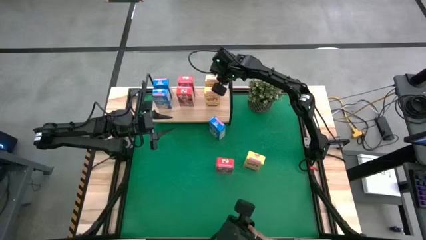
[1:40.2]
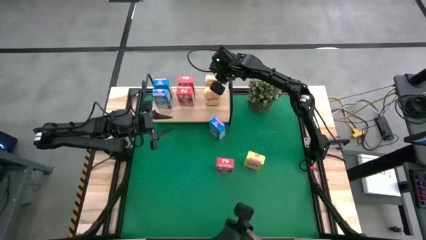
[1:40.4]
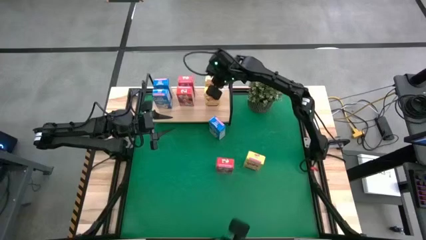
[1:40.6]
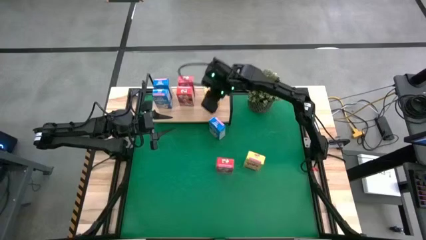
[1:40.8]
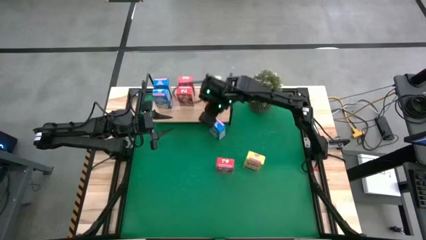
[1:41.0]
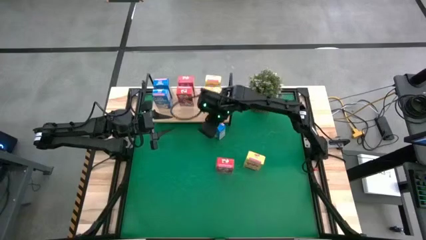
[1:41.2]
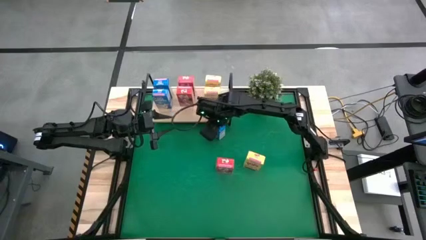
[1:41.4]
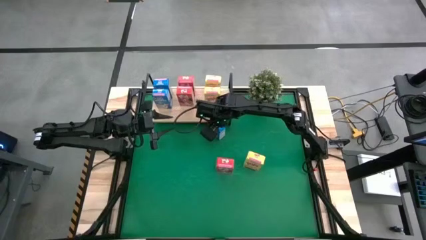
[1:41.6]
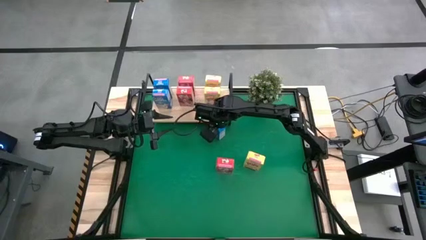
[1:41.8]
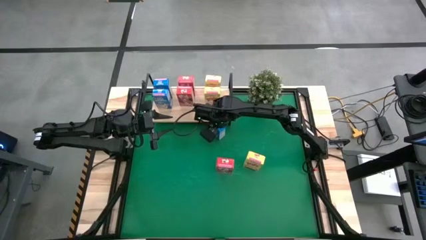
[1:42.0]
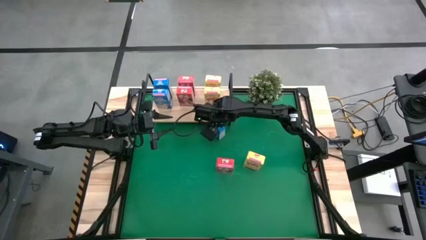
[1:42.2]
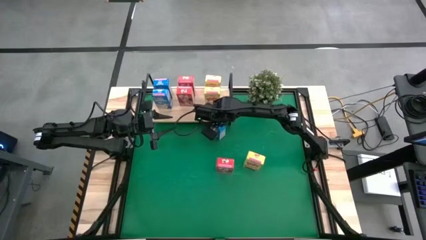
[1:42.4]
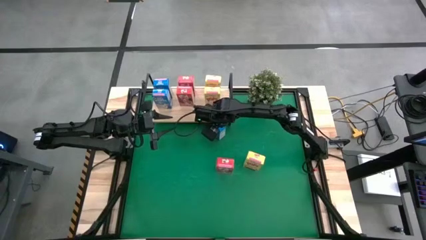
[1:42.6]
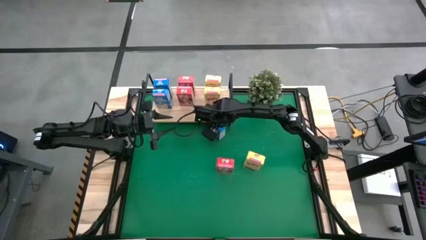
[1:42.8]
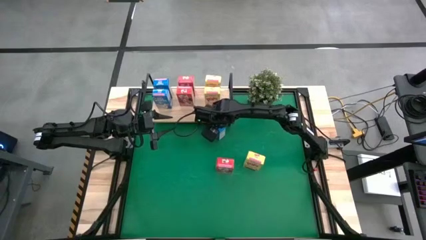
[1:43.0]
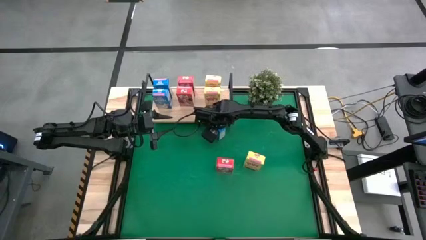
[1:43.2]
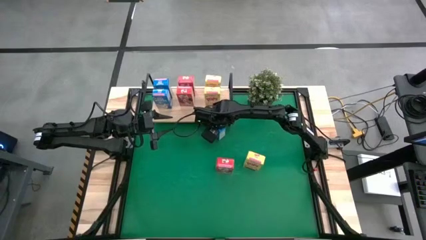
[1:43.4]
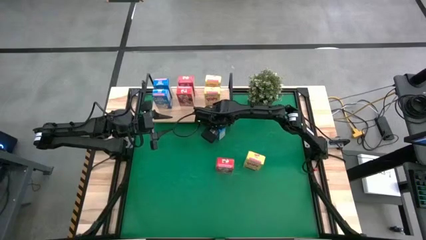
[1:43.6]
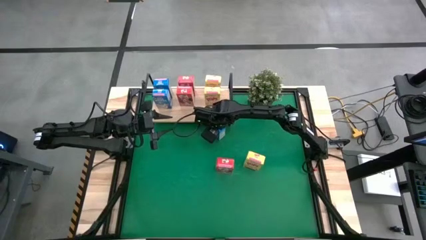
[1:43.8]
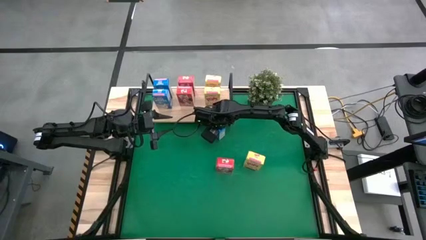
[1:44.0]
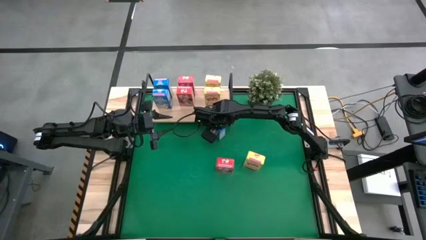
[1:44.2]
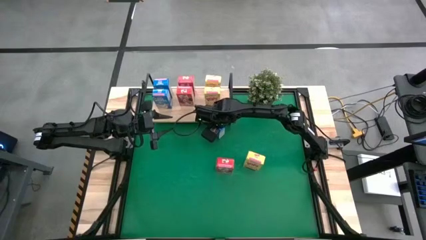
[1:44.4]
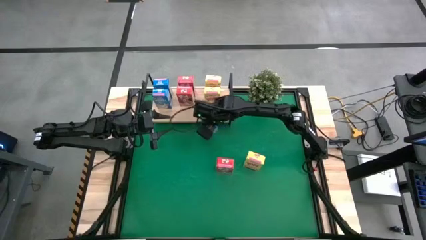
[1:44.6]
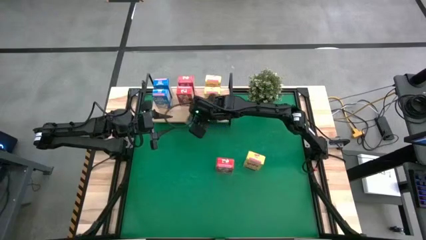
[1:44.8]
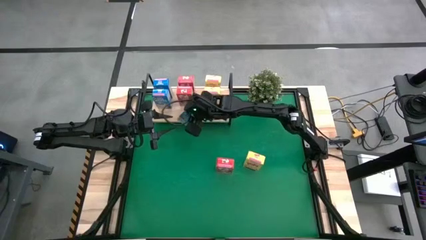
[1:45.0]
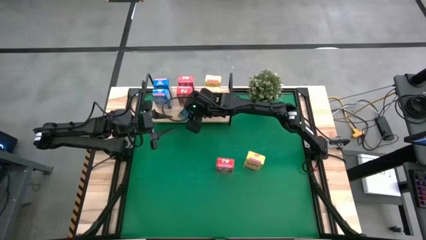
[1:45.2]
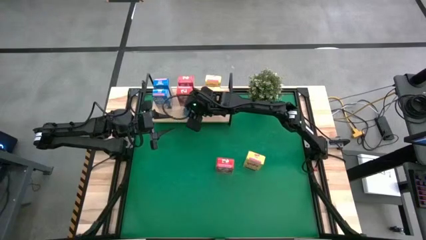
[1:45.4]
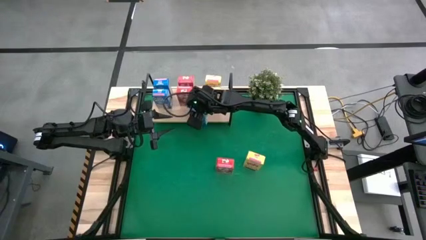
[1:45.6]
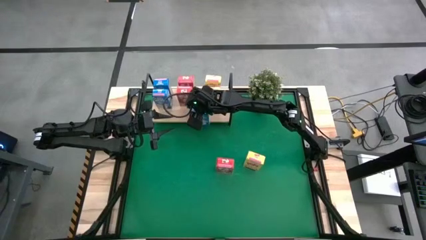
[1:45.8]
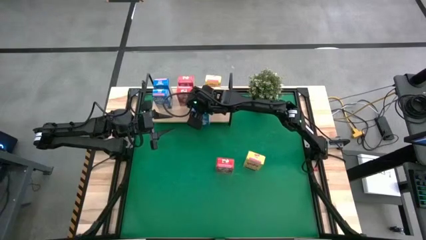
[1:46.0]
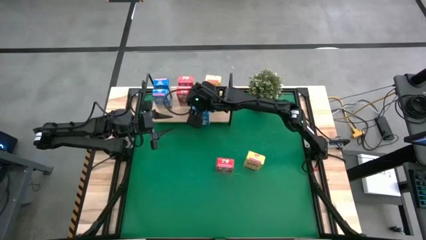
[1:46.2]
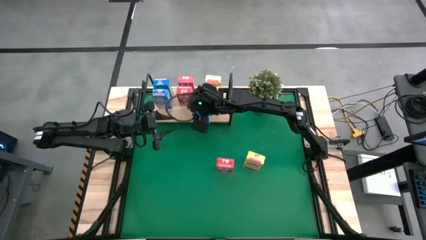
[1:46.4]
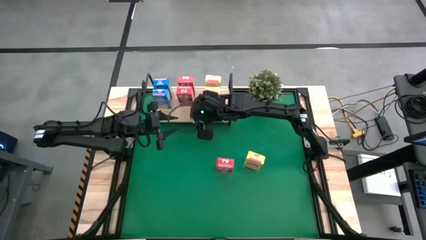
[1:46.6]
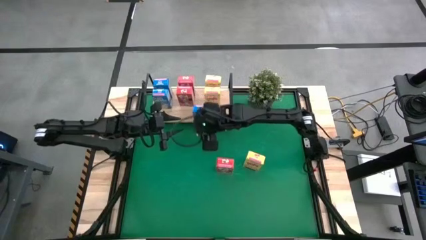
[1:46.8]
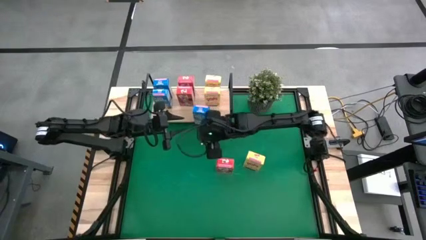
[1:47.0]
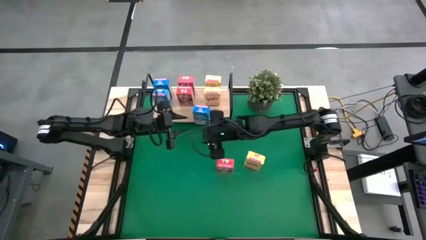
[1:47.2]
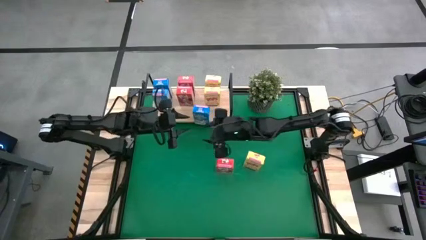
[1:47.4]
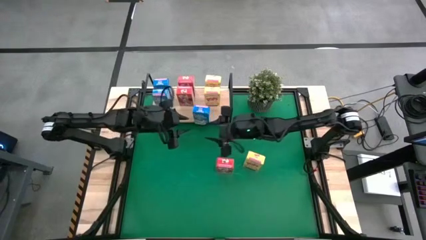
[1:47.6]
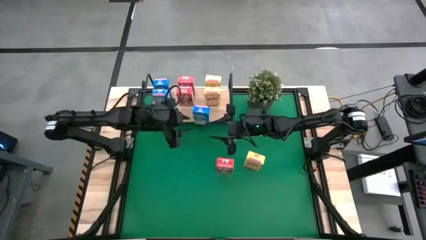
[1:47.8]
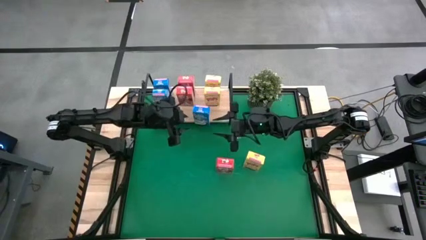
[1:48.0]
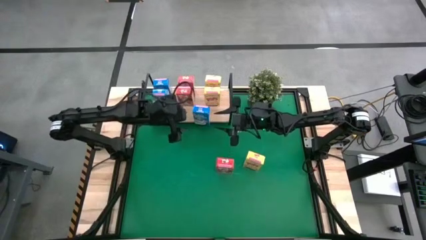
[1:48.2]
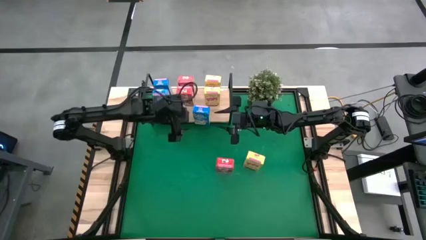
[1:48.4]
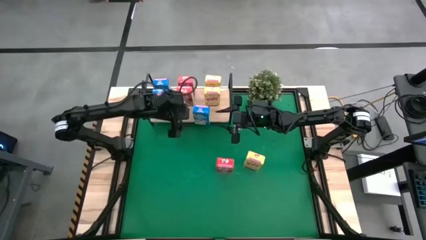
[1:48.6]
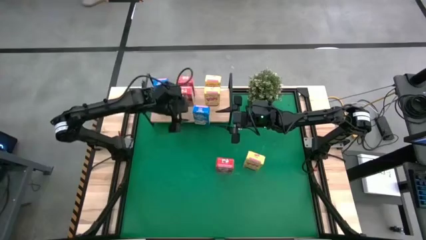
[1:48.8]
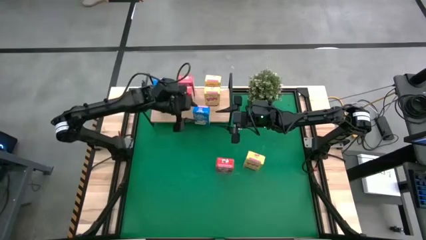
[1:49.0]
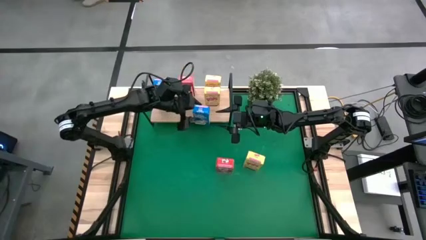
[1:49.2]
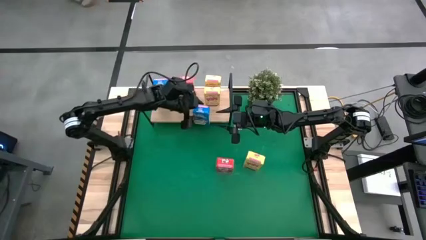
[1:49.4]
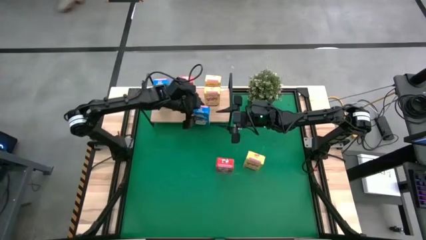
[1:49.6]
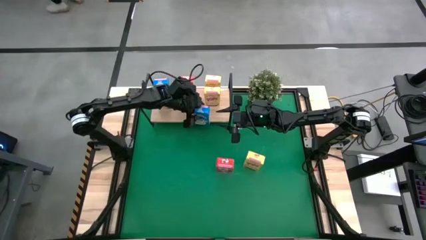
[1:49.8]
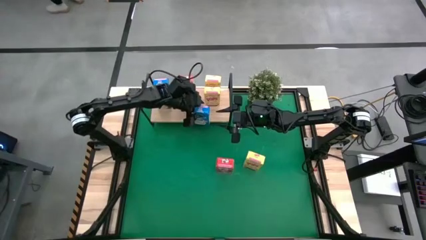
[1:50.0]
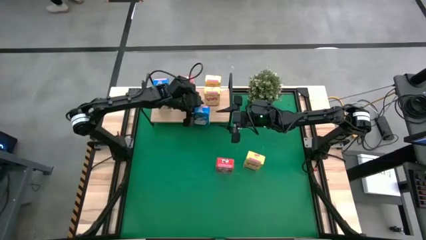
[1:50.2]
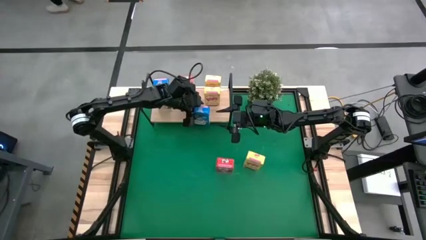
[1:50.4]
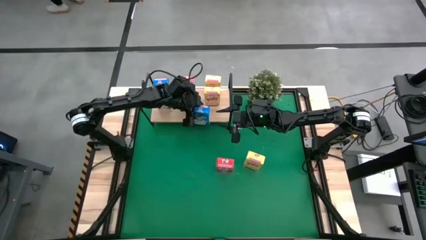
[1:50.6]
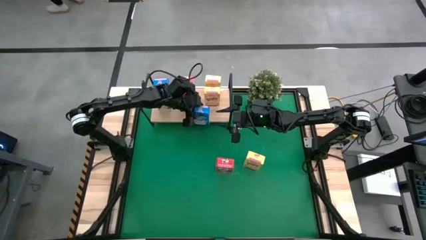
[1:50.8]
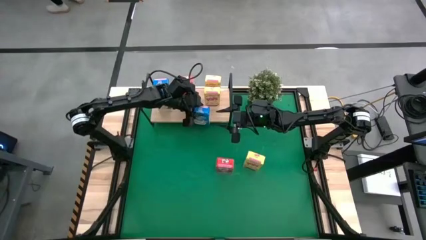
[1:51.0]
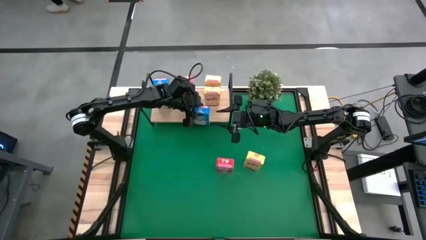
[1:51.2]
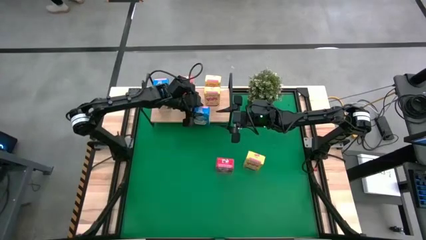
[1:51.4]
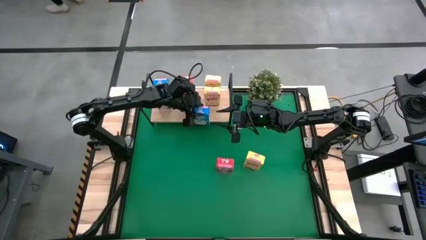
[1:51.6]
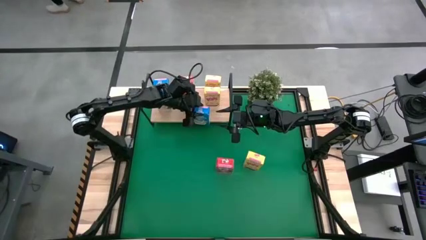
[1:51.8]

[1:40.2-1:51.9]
Task: Stack cereal on shelf
Put the blue cereal box aligned with the other blue cereal boxes on the shelf

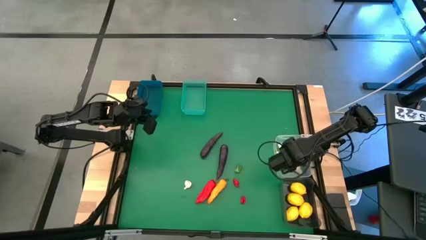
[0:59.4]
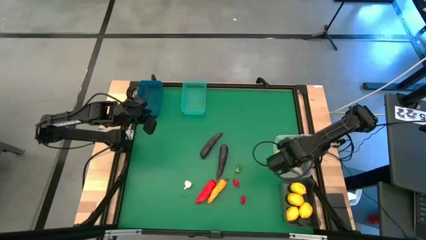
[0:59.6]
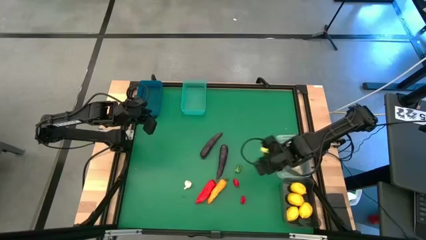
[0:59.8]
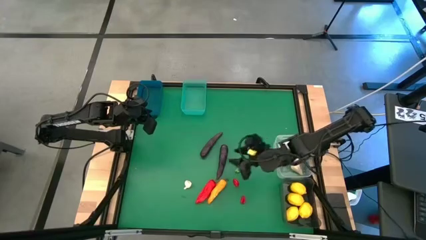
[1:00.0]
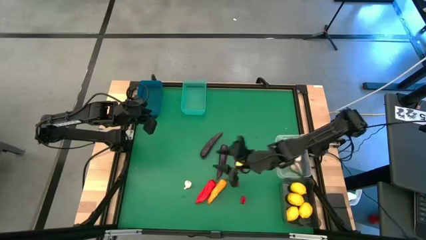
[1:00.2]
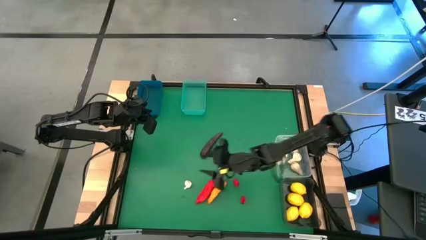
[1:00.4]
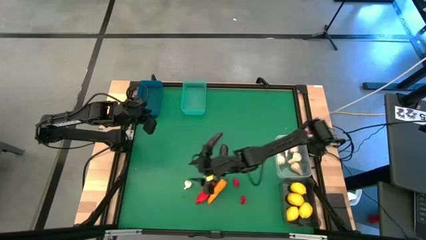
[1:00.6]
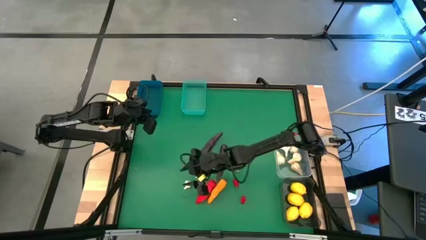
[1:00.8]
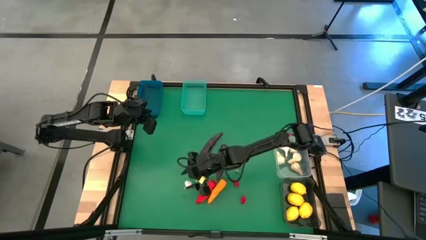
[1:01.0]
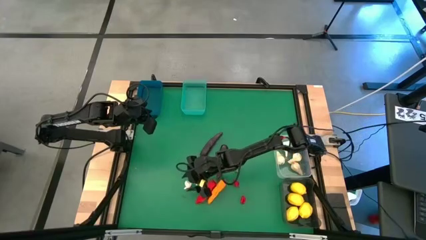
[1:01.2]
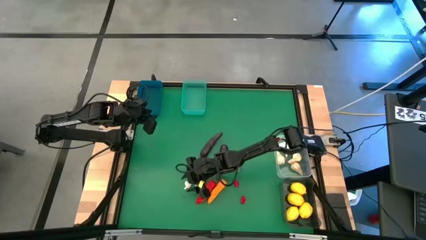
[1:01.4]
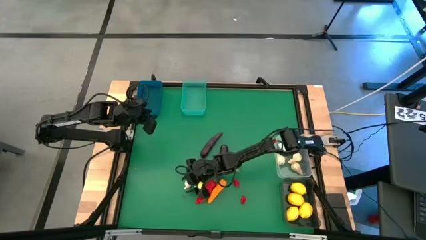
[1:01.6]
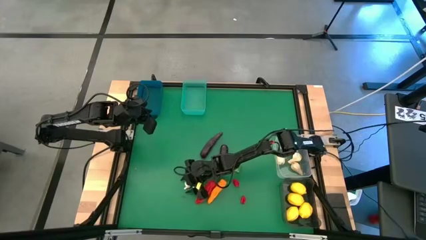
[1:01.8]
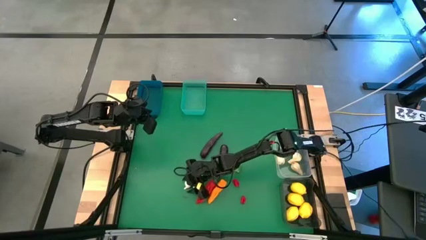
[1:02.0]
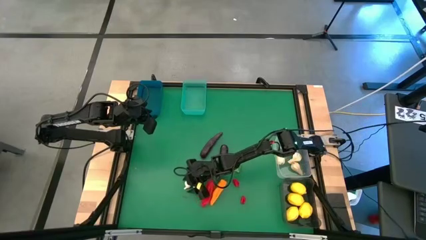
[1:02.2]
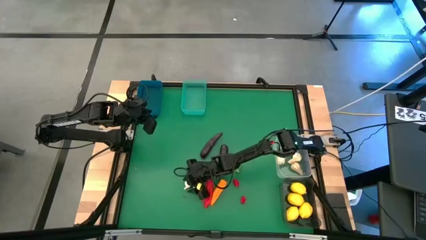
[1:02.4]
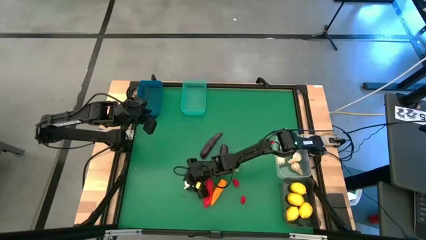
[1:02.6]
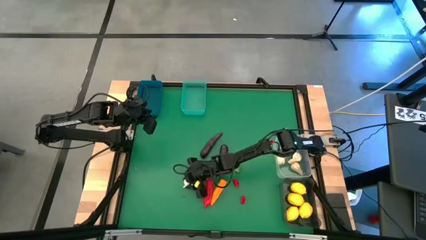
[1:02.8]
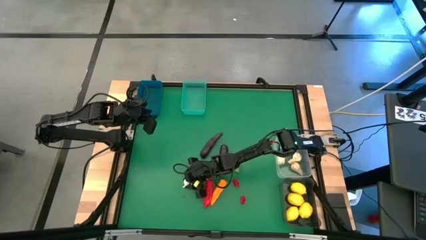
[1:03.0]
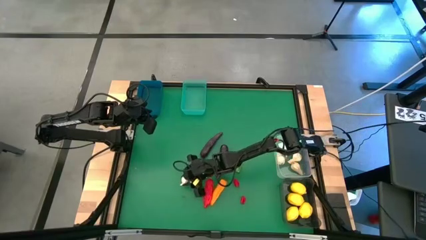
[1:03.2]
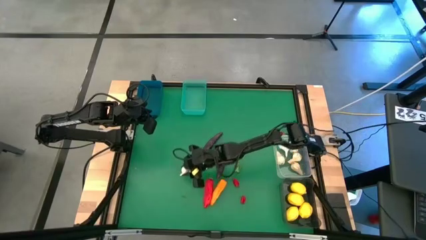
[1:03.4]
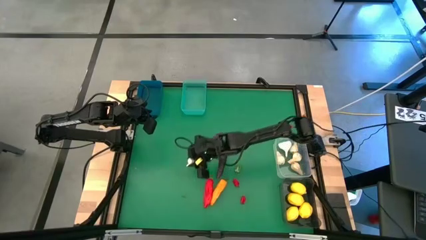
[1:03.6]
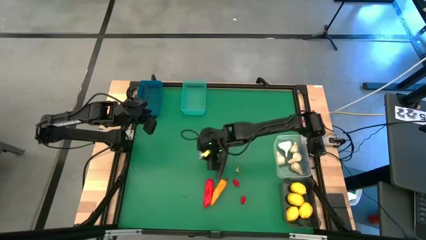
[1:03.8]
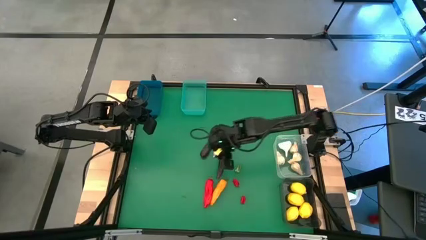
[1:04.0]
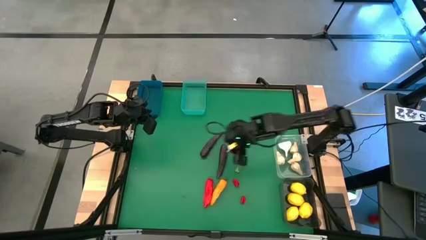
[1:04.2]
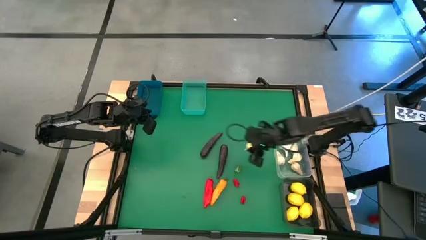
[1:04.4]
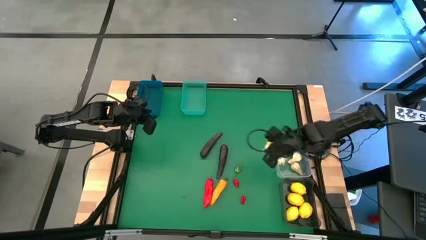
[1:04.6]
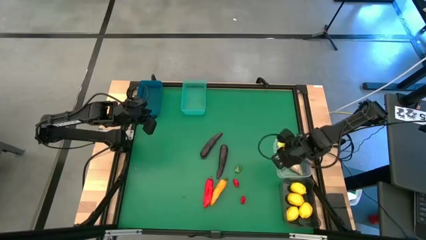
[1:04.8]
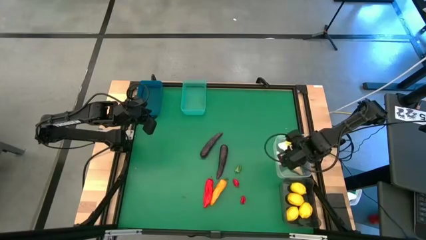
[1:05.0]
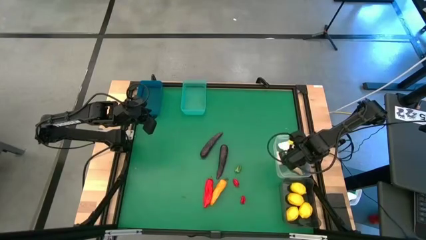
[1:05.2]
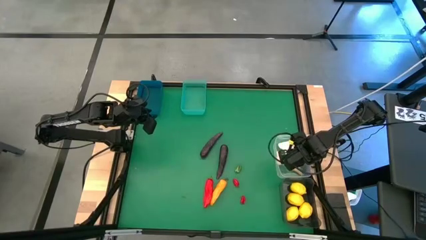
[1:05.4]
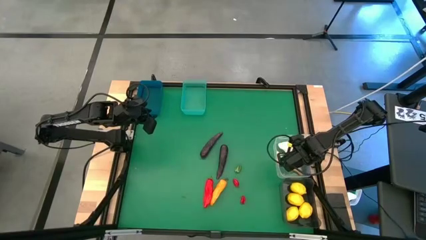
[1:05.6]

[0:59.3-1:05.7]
Task: Sort produce into baskets
Put the white garlic into the transparent bin
